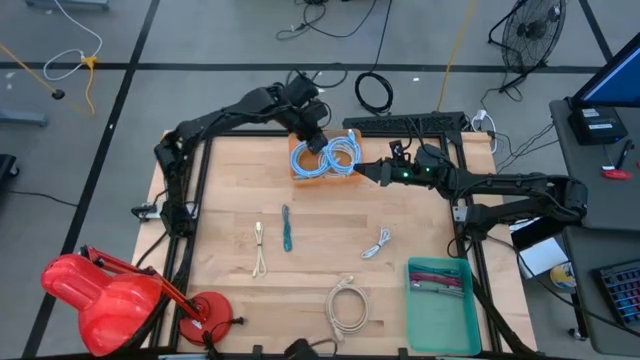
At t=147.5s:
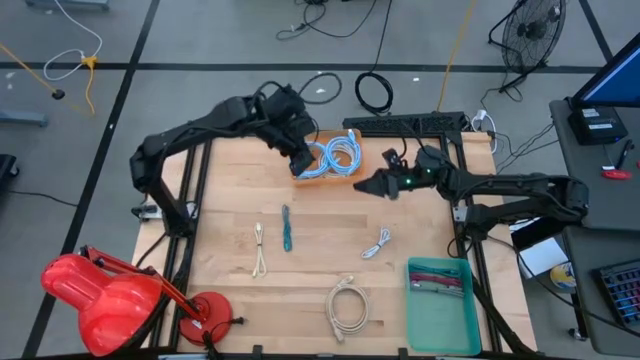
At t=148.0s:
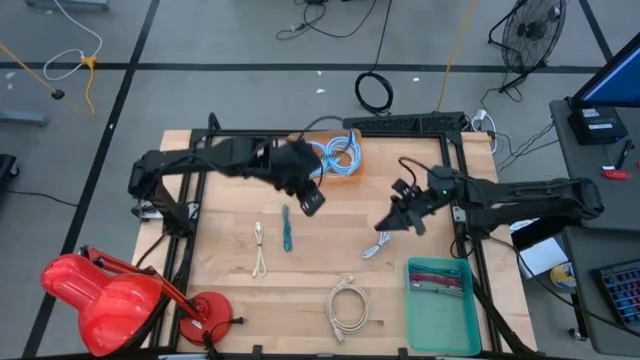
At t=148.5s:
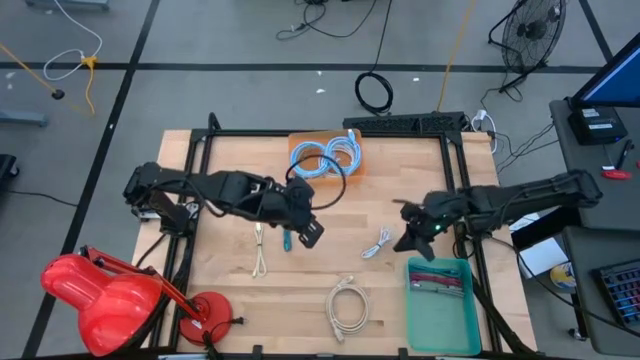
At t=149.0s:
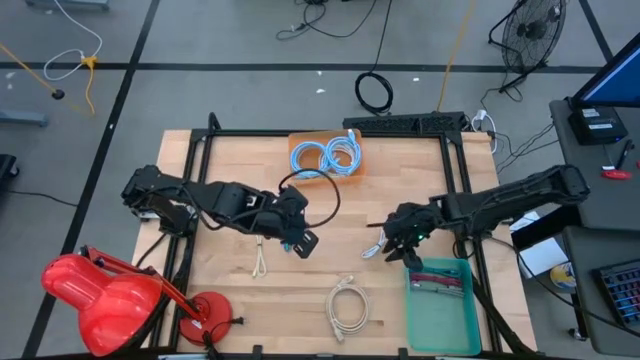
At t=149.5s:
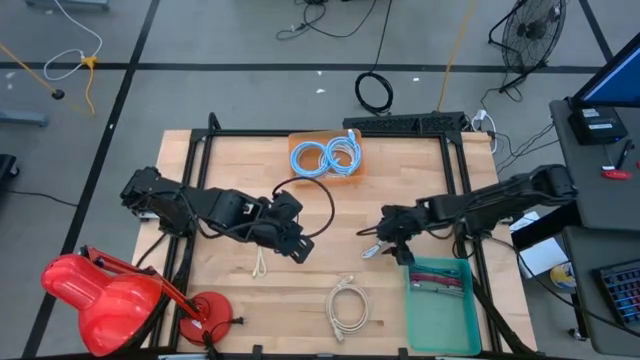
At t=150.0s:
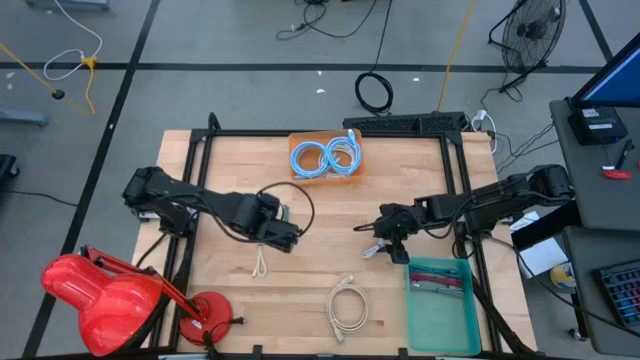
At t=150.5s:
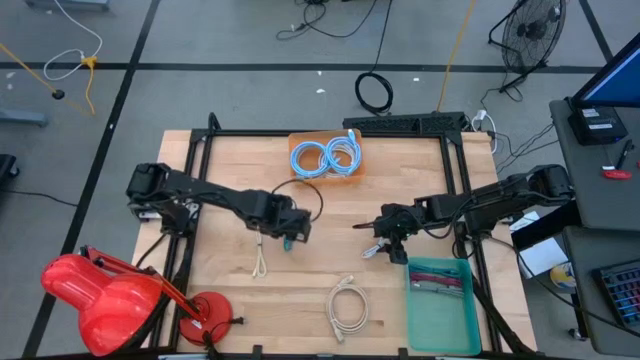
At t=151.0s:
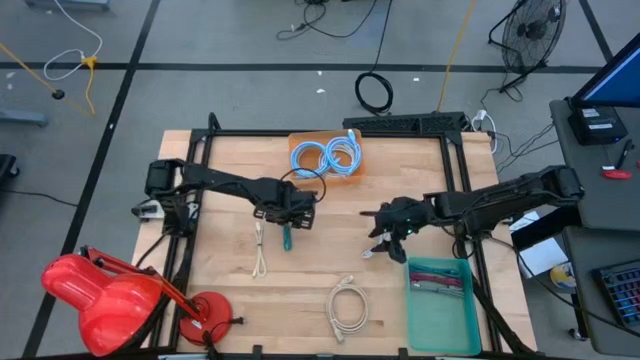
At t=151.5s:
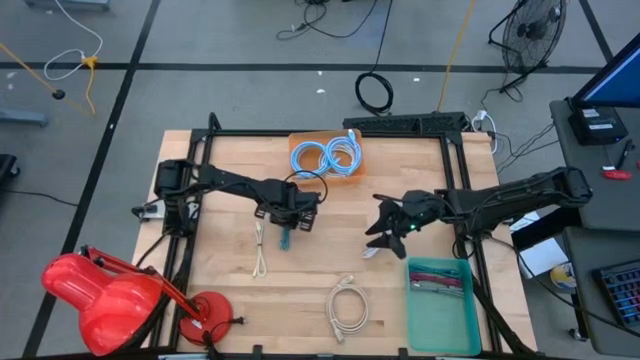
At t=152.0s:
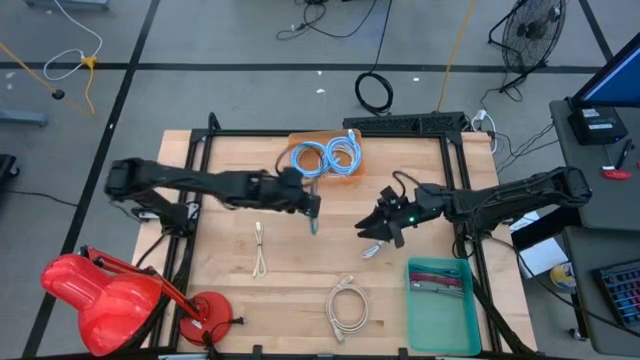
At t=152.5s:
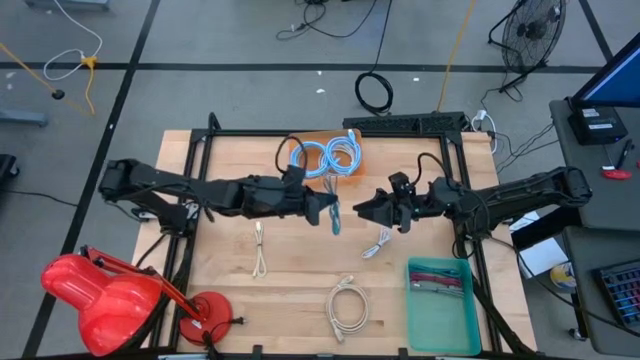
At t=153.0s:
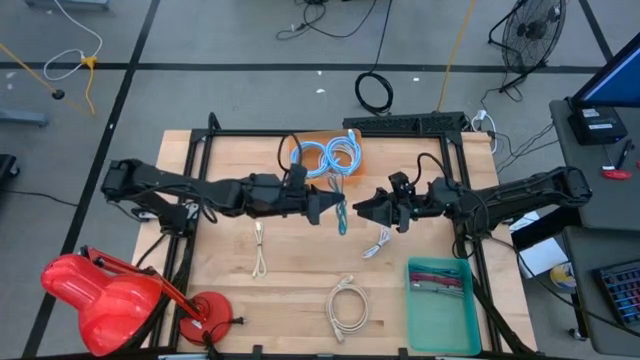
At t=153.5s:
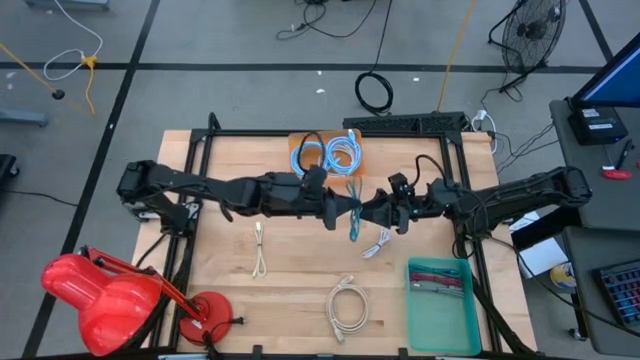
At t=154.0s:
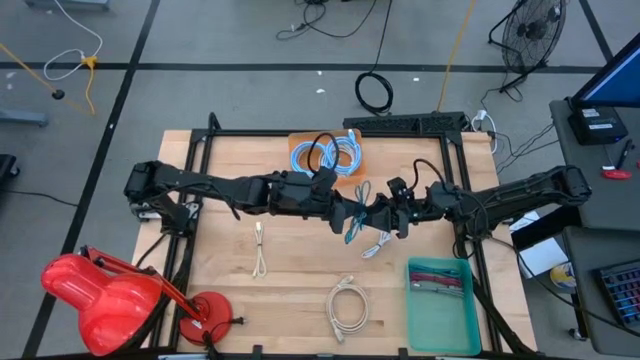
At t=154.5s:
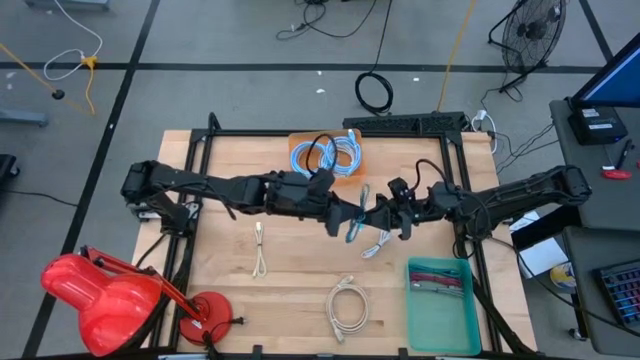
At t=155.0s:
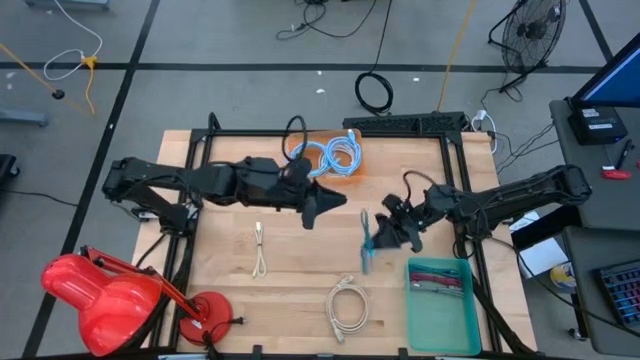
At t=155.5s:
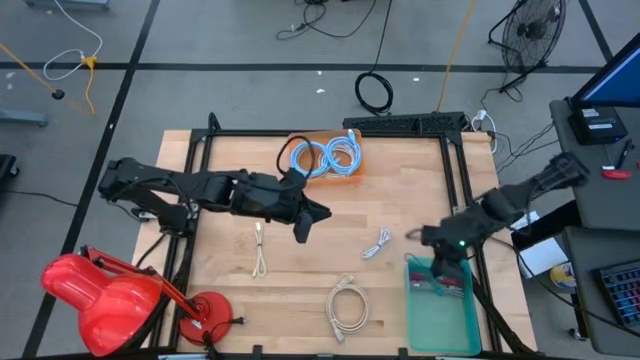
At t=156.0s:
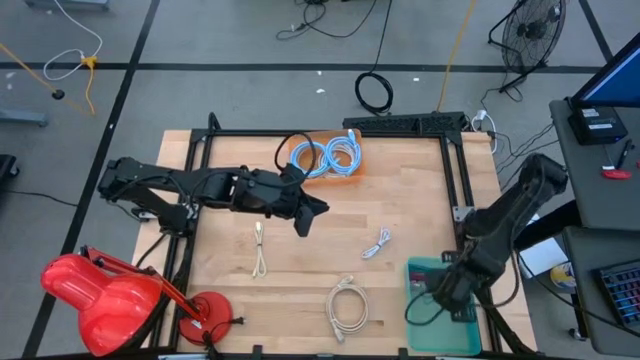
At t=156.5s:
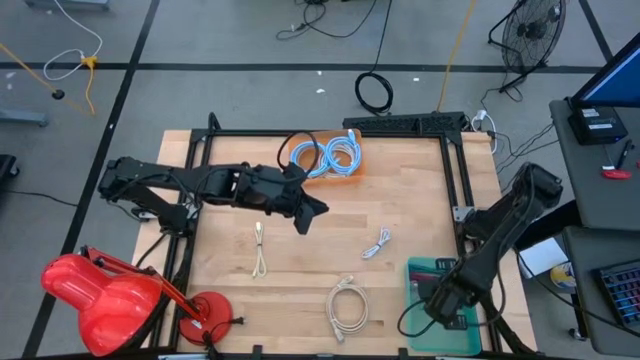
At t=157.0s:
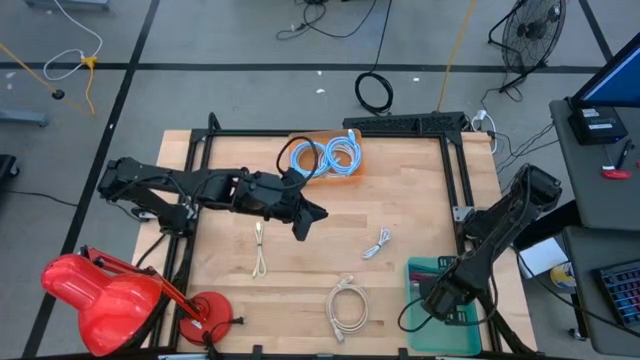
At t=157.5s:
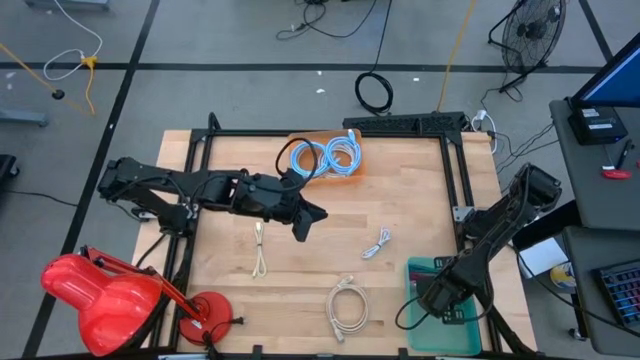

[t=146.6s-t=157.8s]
Task: Pick & Place USB Port
Put the small blue charger cable into the green bin

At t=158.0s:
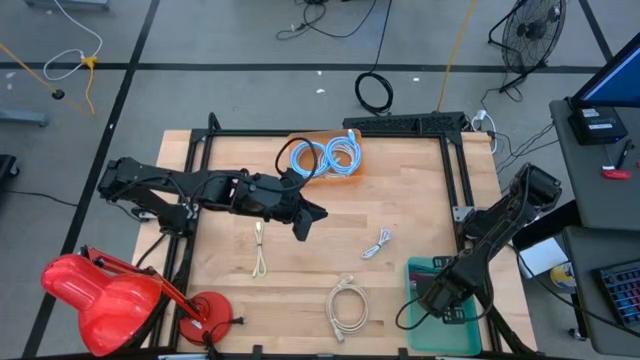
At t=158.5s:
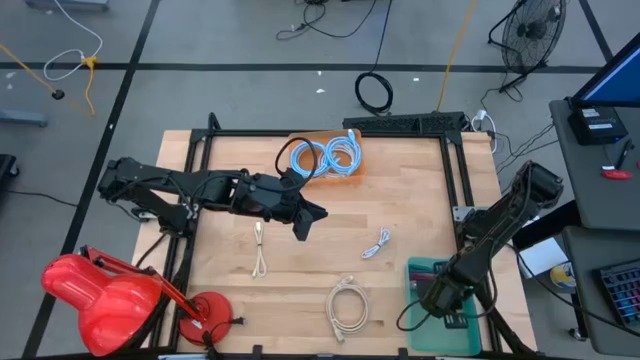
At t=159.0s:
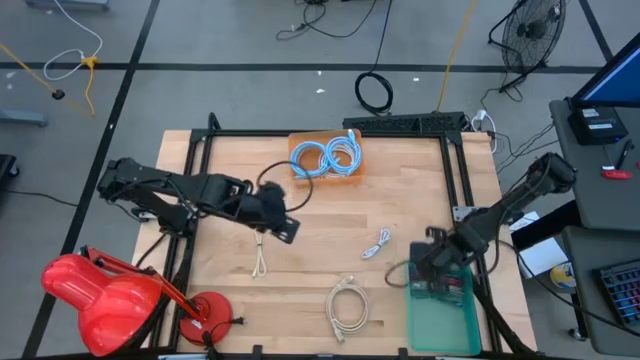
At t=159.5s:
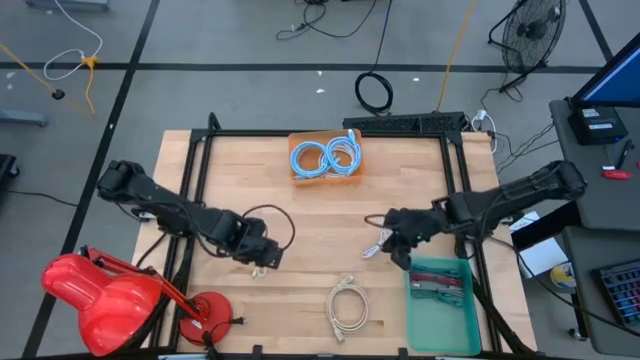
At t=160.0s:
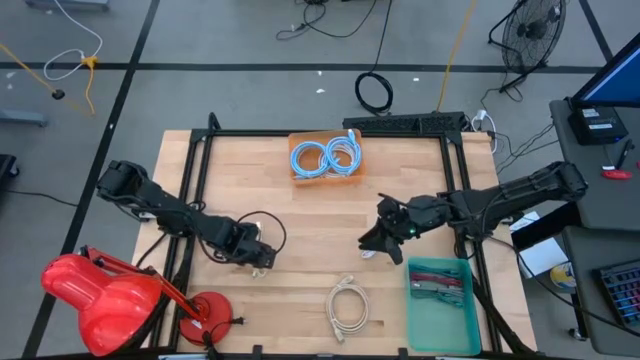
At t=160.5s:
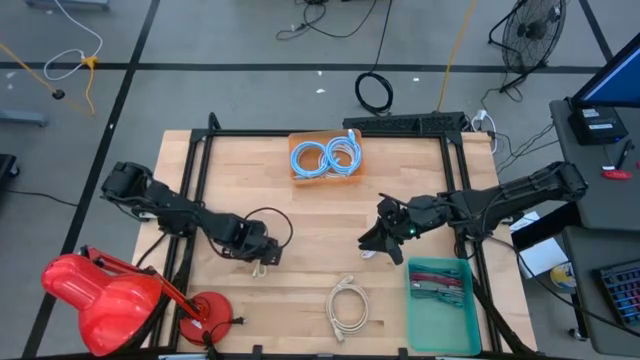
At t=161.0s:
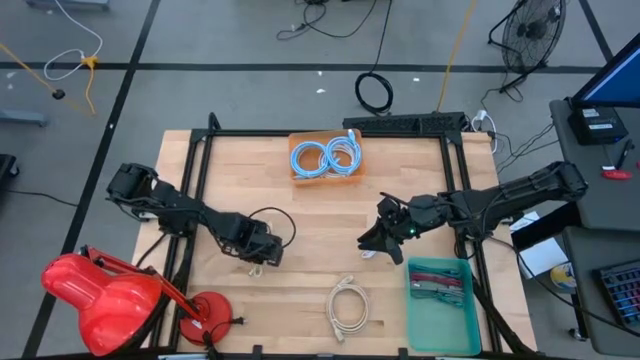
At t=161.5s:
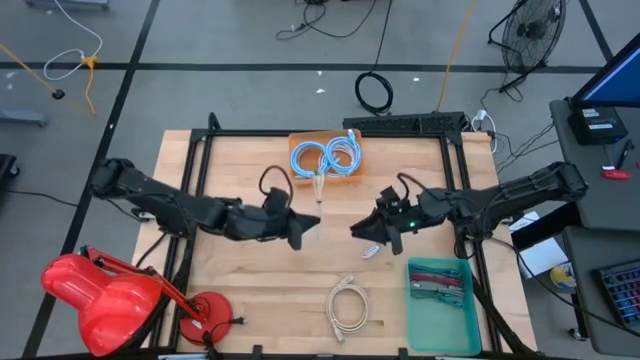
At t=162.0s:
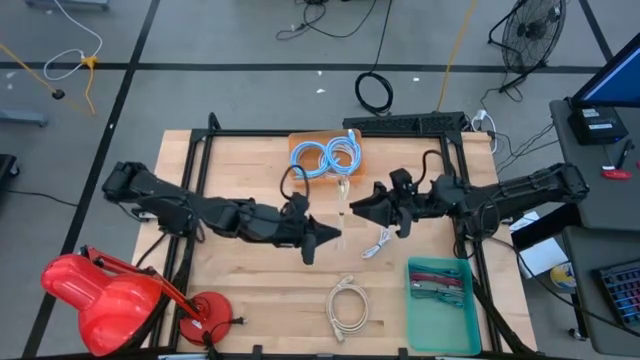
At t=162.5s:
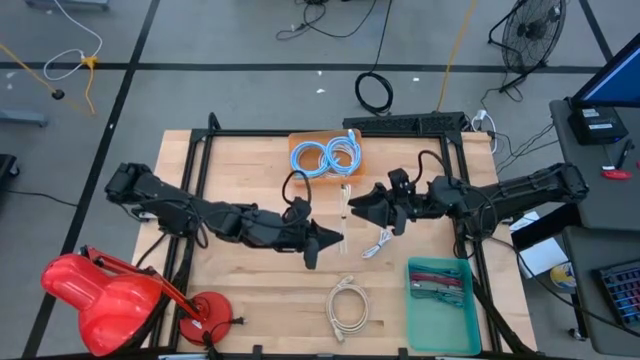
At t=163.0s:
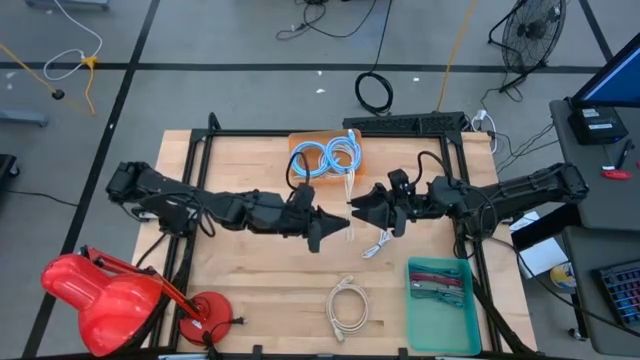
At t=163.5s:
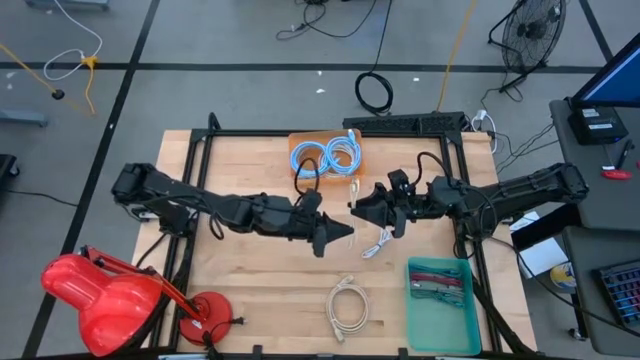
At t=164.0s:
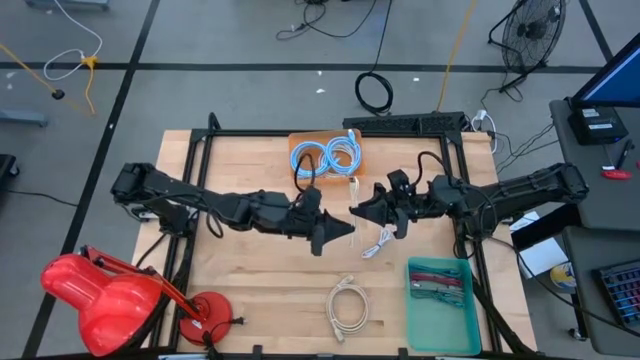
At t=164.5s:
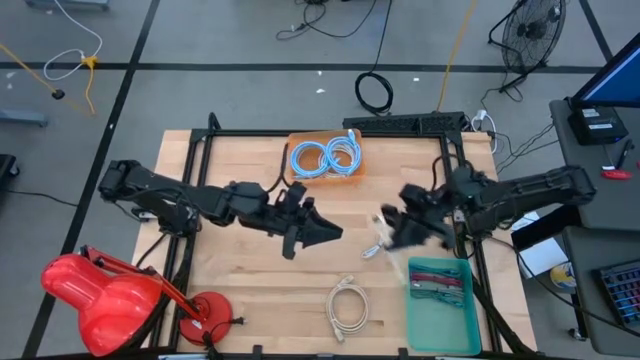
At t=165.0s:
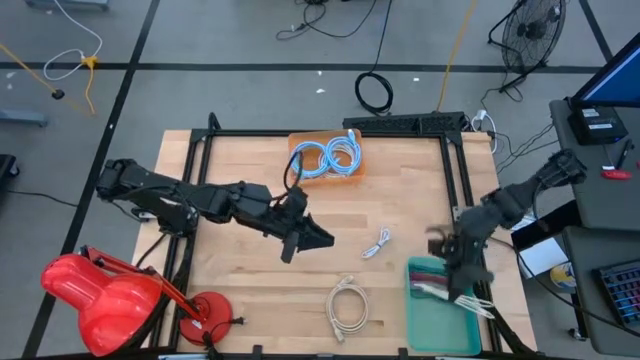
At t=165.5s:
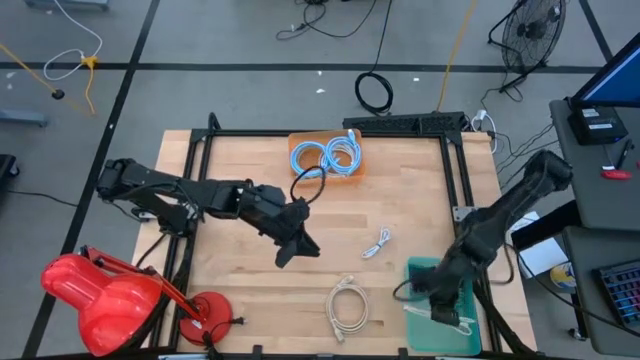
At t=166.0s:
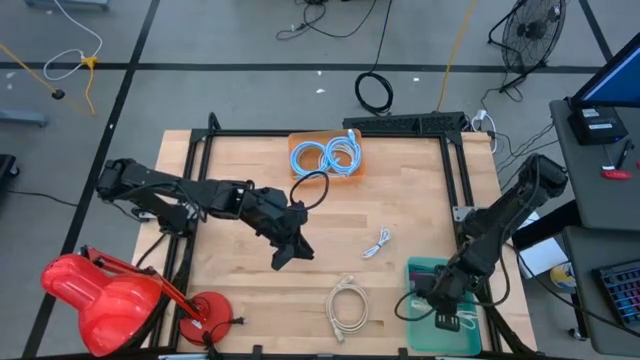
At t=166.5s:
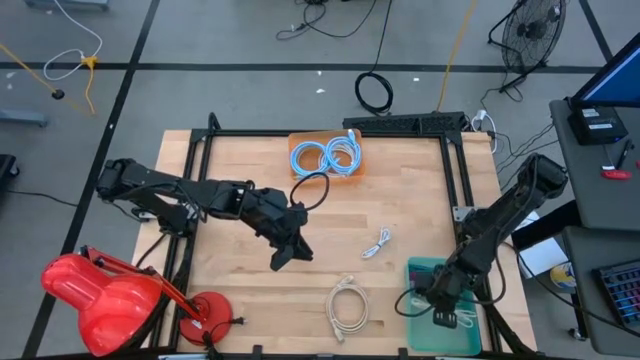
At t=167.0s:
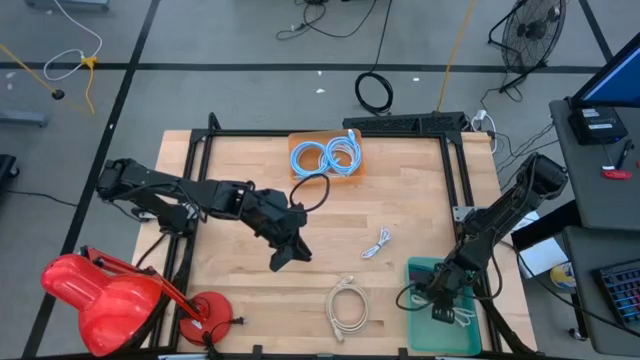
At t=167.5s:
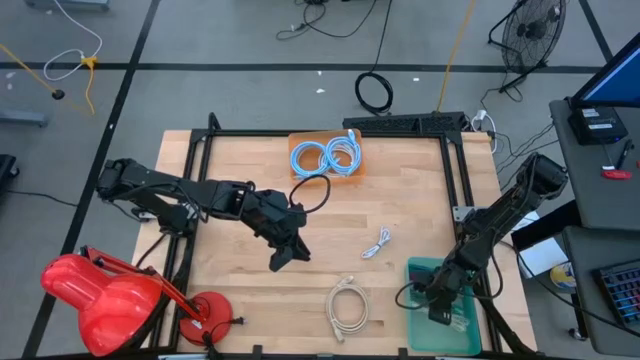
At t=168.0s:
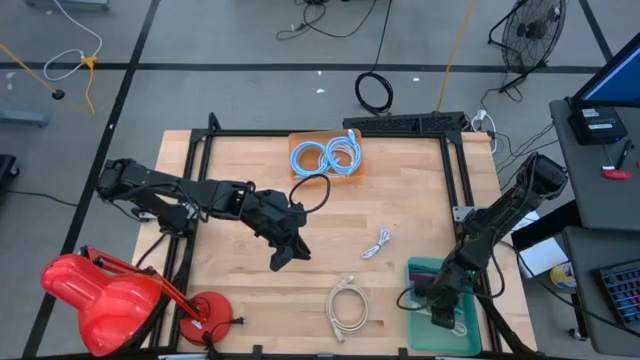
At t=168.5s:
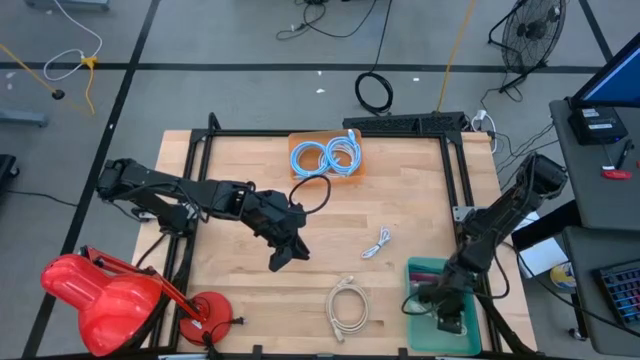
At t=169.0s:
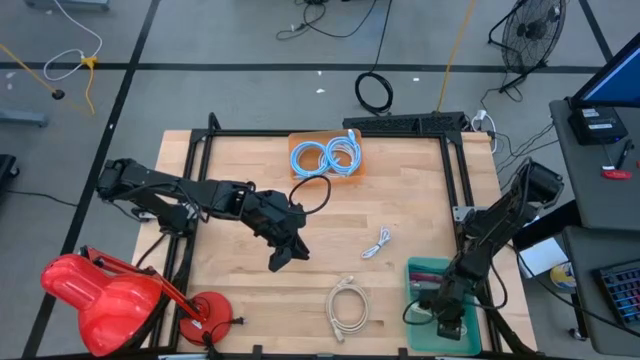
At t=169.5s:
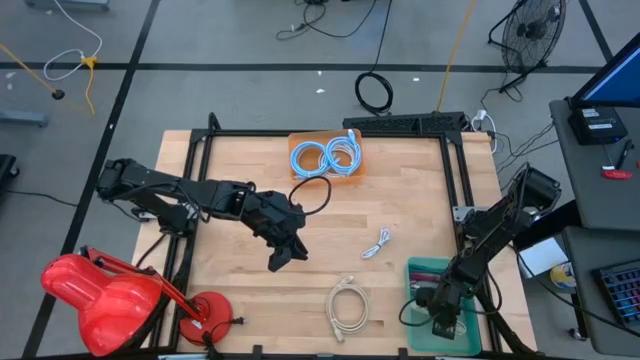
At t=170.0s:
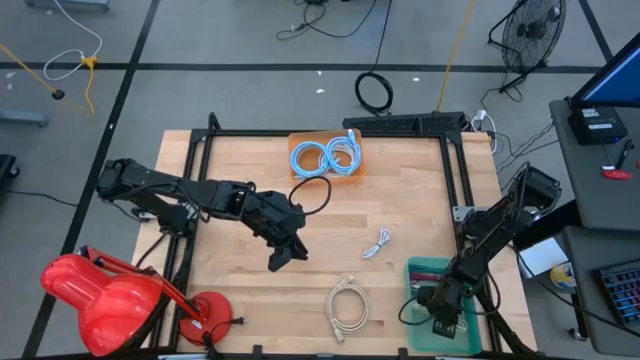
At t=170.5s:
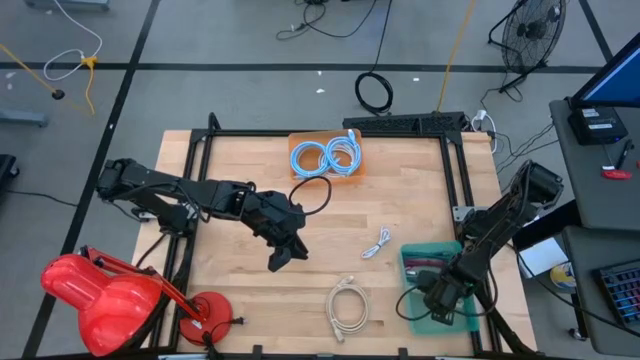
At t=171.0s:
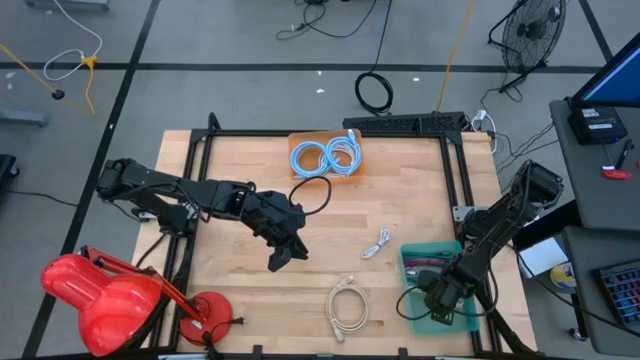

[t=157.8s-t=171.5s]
Put the small yellow charger cable into the green bin
